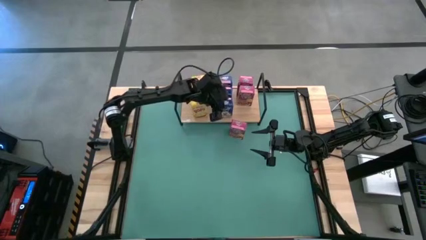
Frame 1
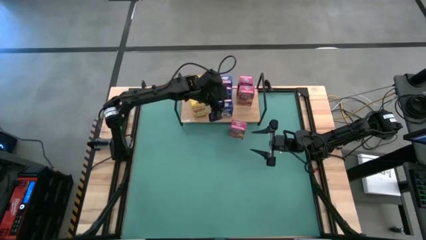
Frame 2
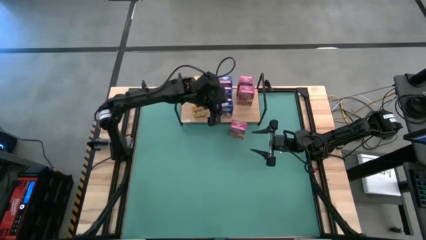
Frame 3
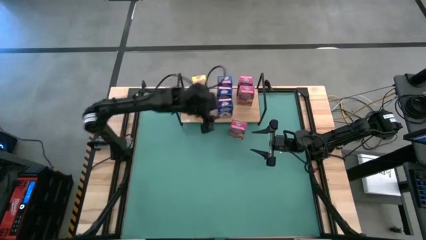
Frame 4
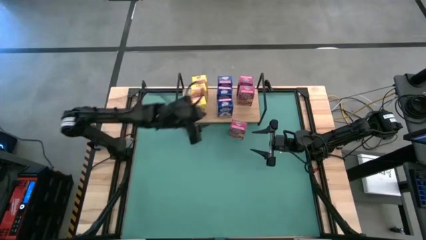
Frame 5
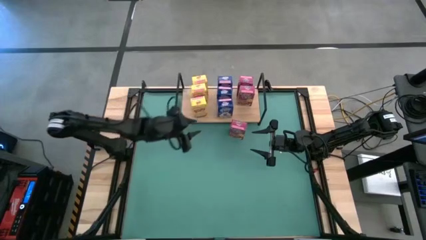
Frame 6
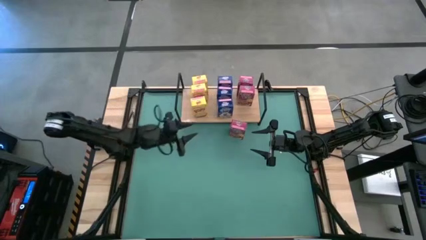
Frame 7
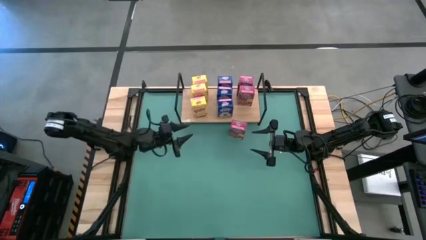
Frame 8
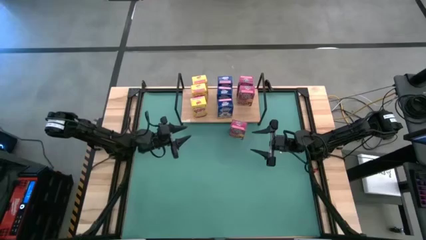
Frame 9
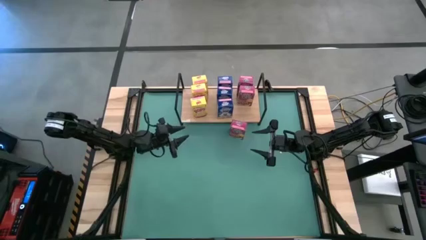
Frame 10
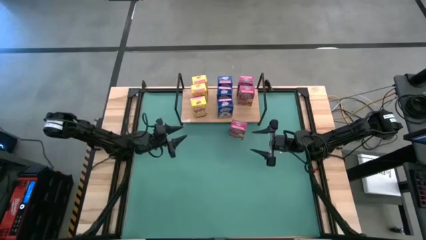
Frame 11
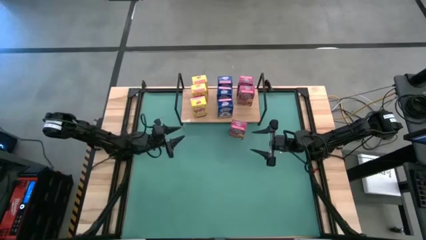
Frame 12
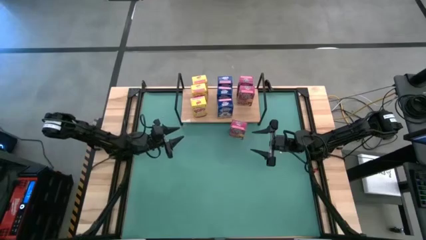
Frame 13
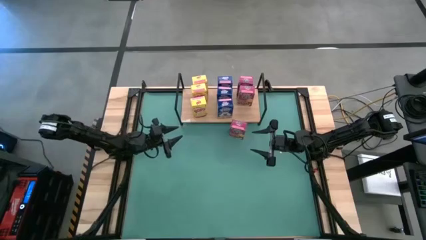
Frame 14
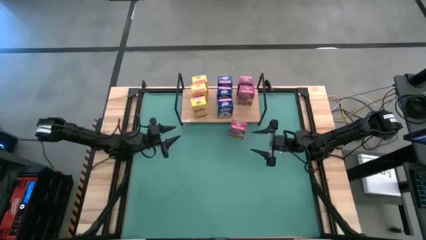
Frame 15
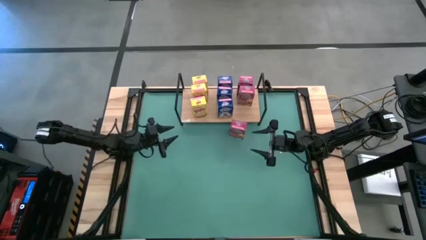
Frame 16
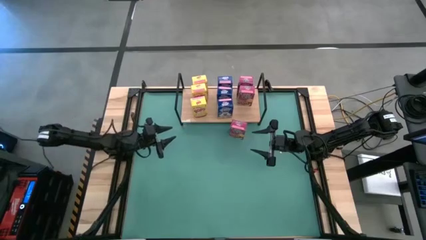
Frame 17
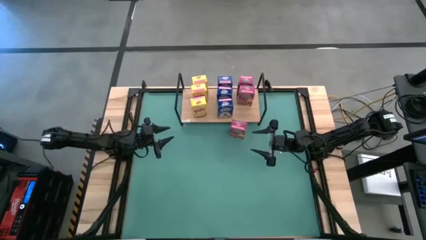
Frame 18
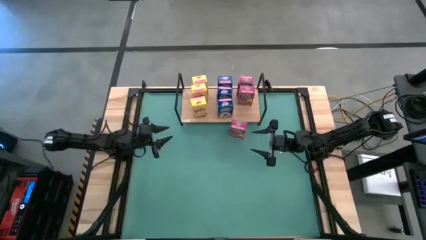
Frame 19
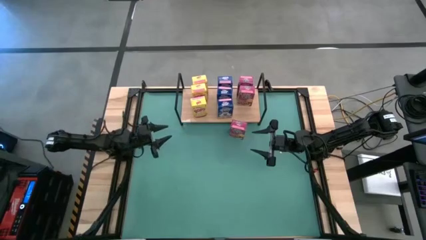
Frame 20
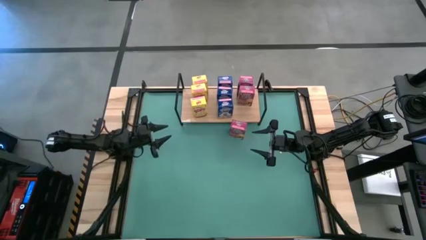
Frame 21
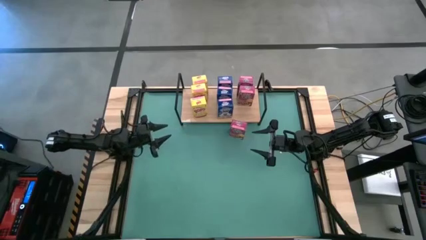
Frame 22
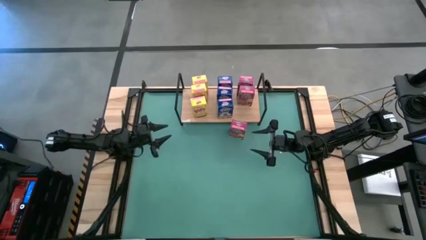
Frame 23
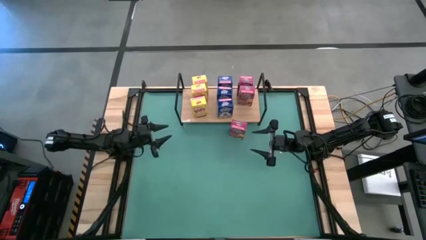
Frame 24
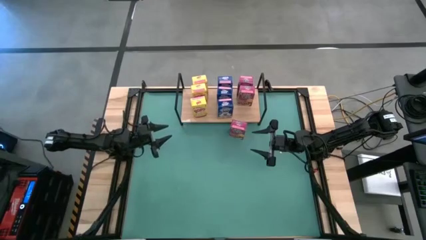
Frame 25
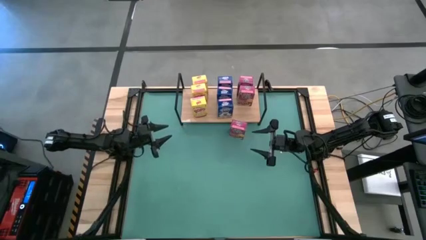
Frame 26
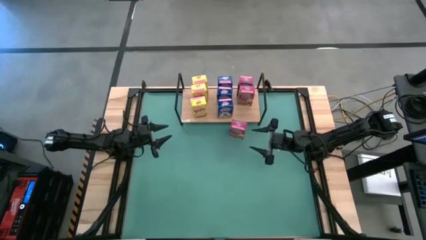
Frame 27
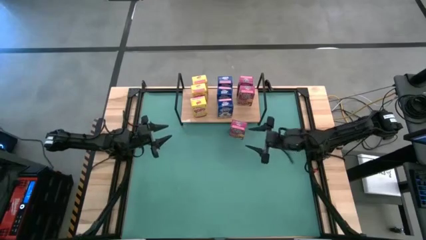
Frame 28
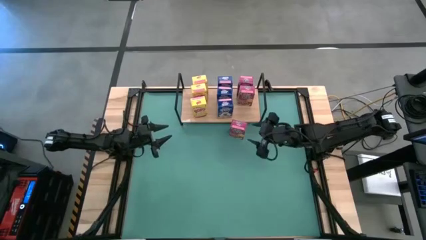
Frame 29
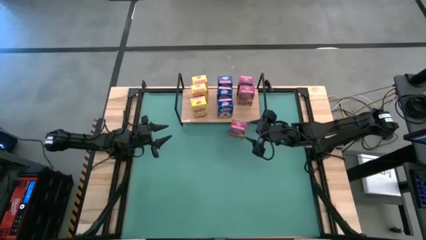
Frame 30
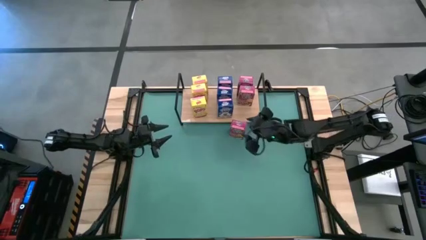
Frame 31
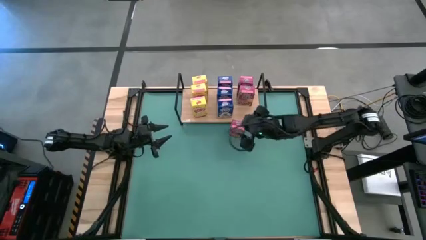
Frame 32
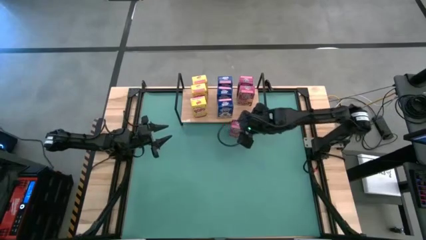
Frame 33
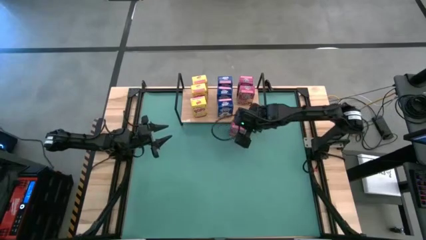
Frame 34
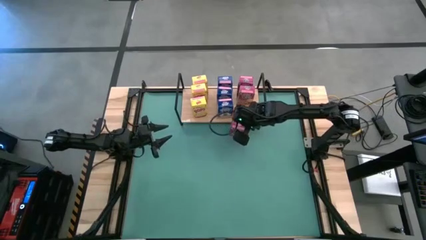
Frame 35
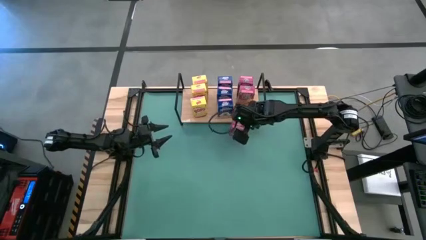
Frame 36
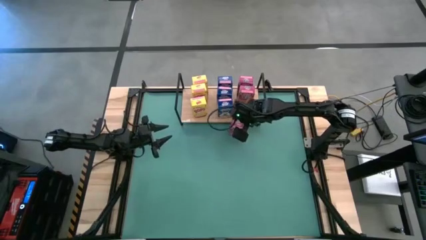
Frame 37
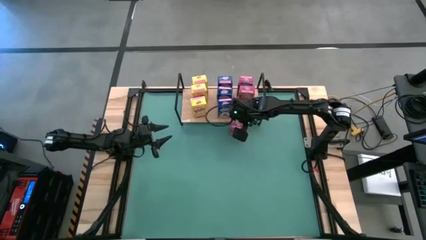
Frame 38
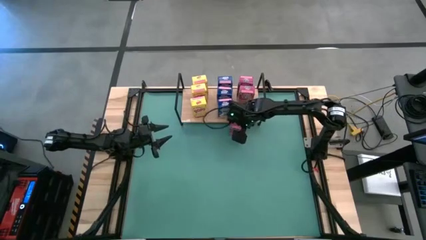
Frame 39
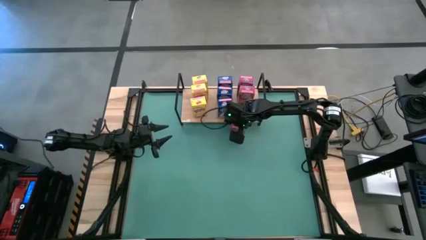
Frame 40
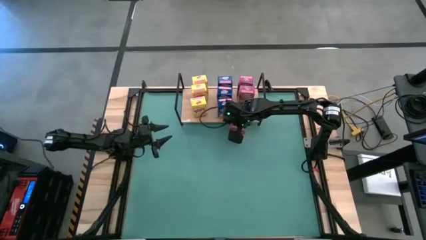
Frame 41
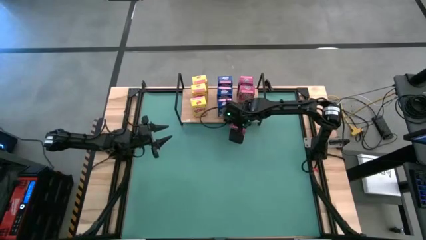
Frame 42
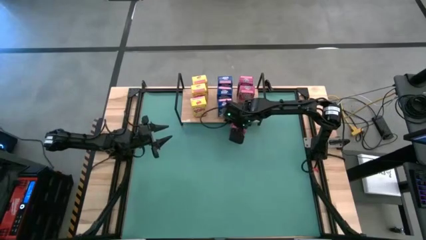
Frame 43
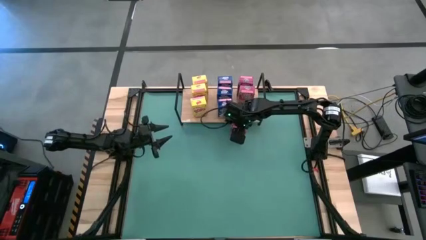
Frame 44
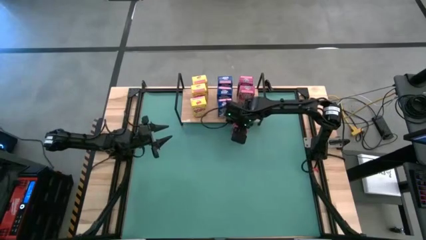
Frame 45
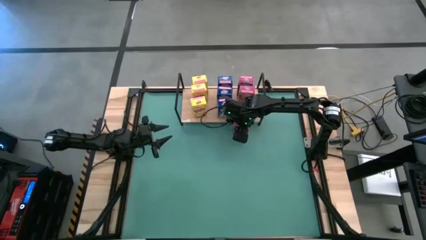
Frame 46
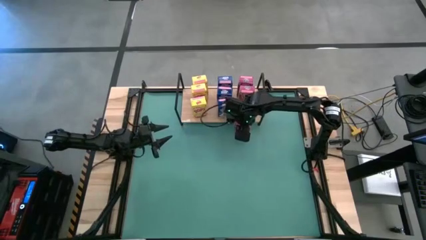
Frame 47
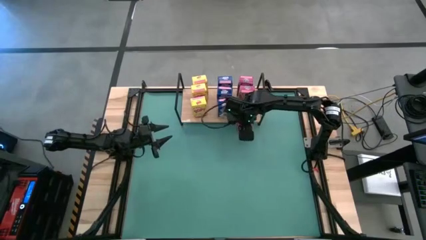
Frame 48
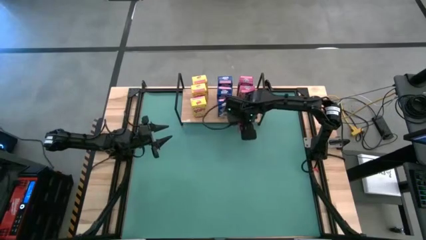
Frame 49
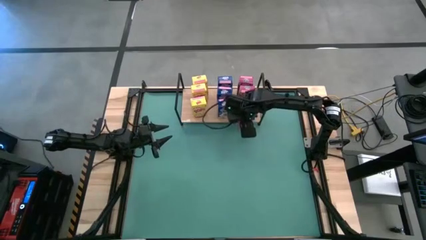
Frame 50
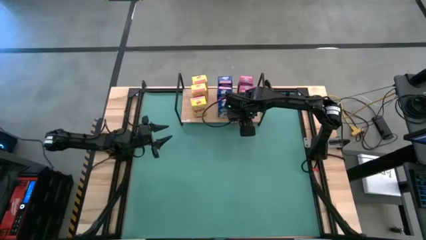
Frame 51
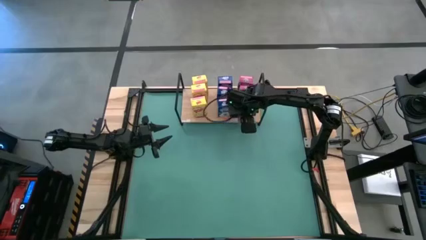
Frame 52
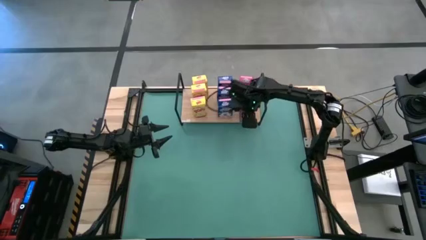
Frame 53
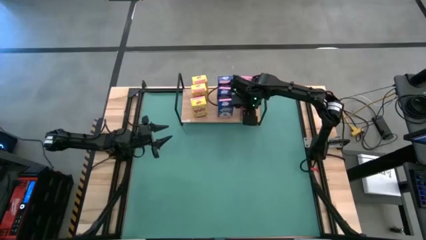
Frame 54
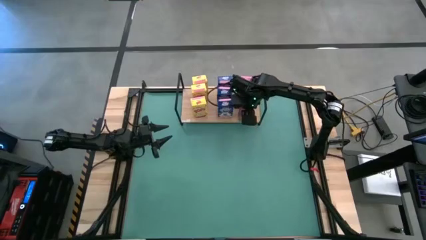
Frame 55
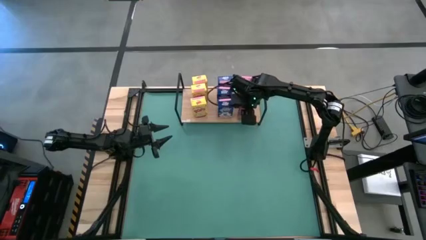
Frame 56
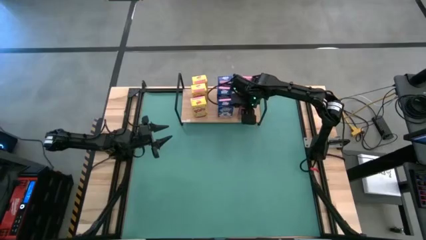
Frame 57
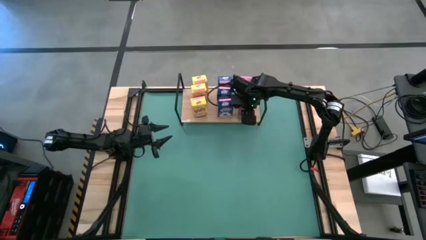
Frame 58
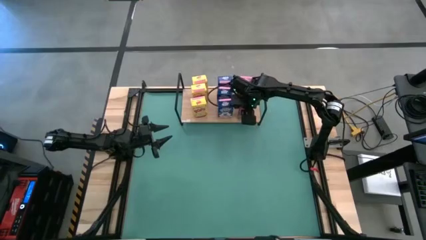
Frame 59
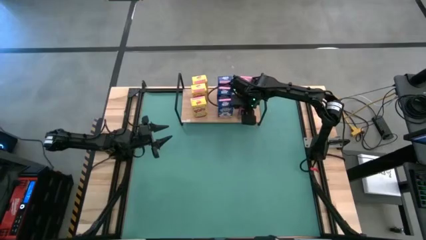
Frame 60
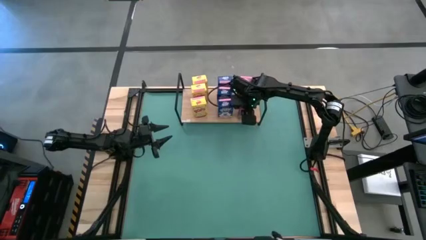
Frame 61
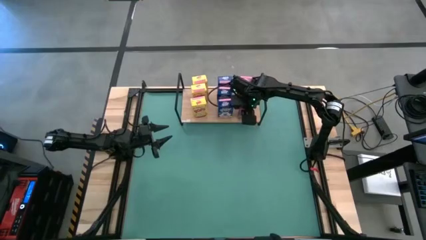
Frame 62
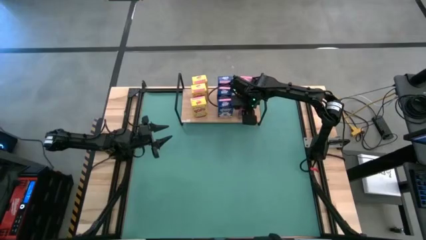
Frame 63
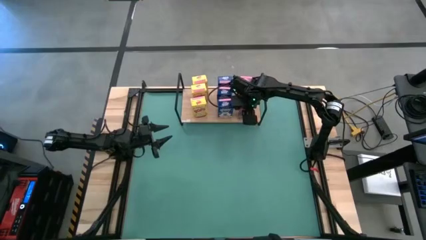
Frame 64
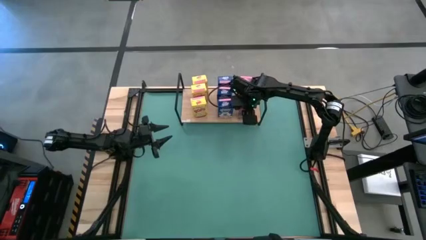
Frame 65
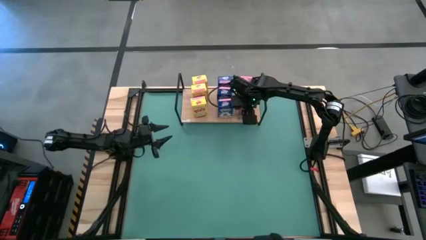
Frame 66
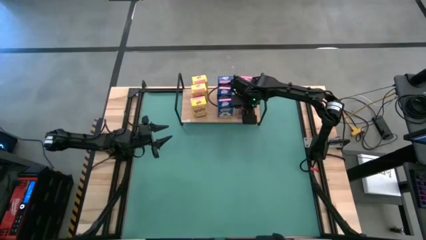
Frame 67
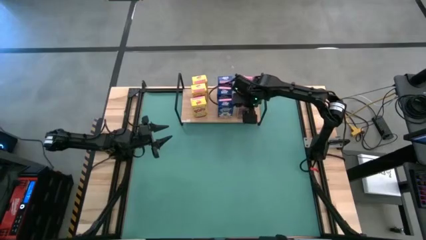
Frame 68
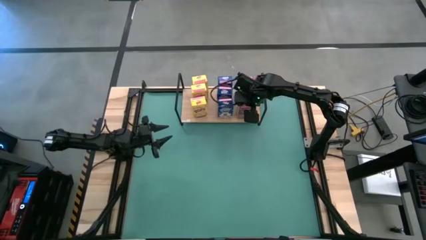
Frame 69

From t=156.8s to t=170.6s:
Task: Stack cereal on shelf
Put the pink cereal box on the shelf aligned with the other pink cereal boxes

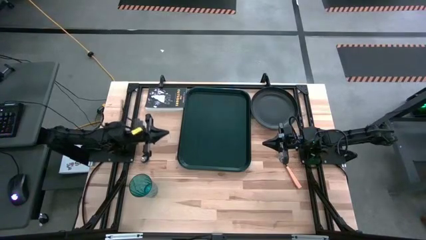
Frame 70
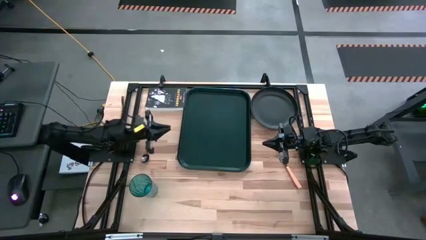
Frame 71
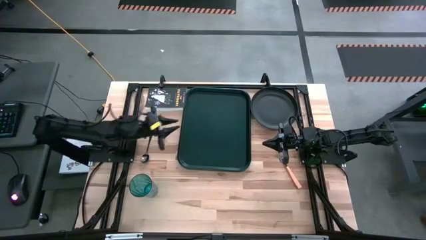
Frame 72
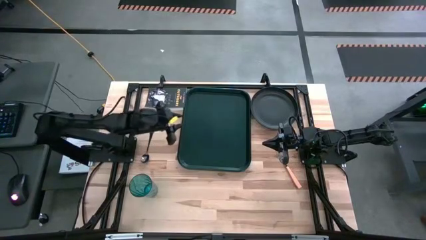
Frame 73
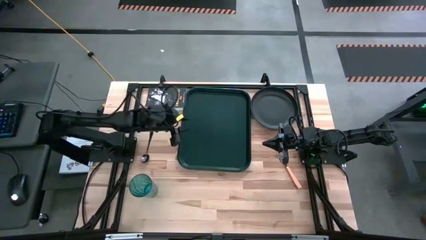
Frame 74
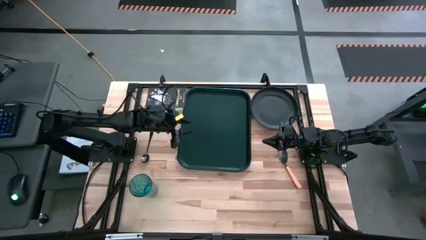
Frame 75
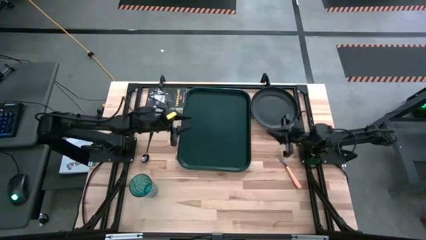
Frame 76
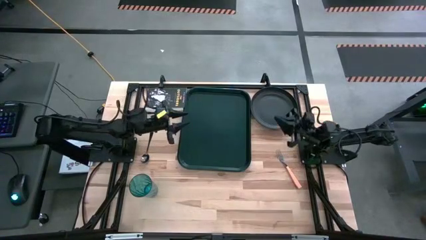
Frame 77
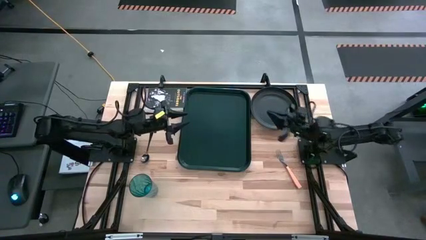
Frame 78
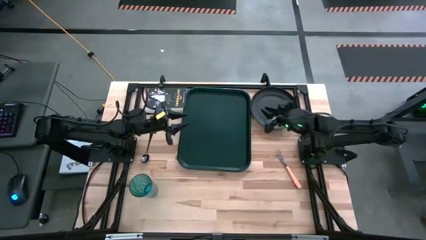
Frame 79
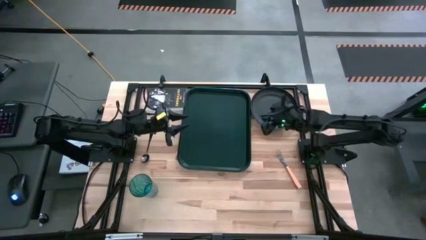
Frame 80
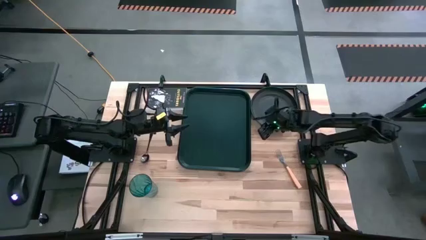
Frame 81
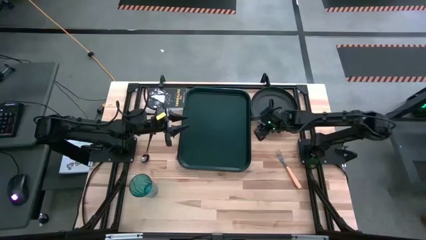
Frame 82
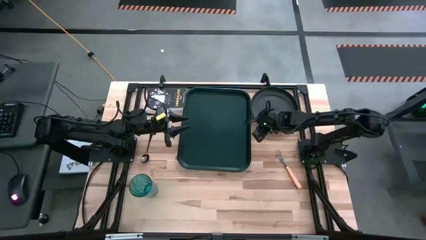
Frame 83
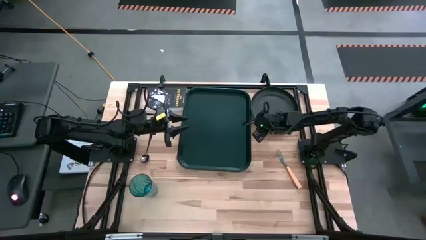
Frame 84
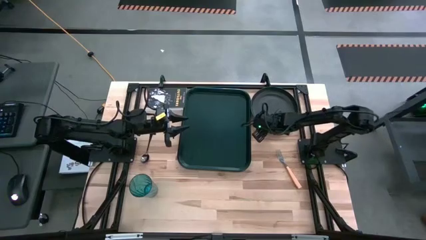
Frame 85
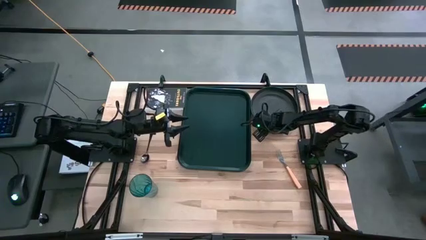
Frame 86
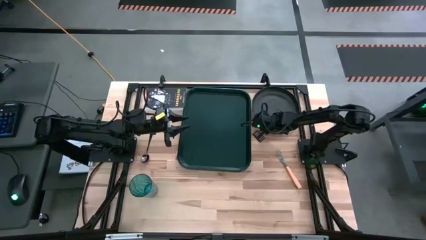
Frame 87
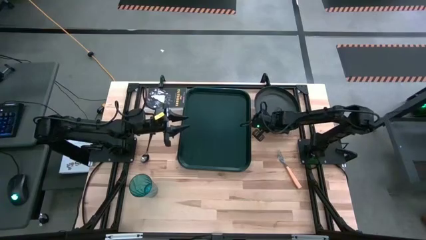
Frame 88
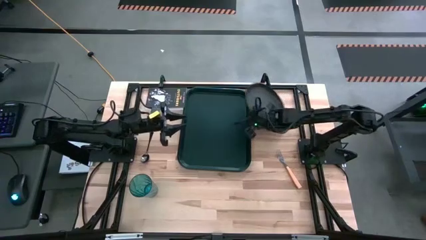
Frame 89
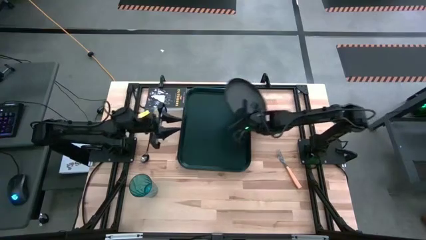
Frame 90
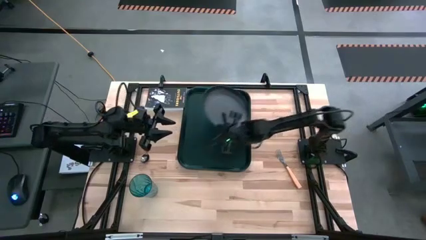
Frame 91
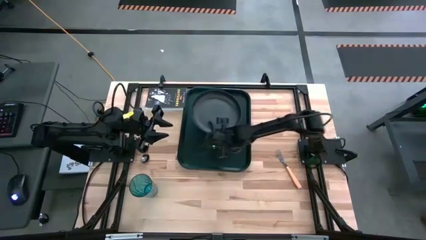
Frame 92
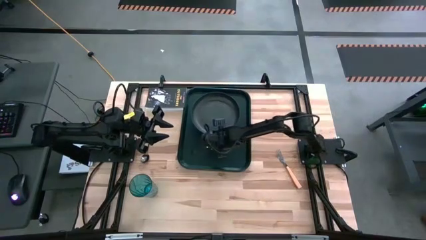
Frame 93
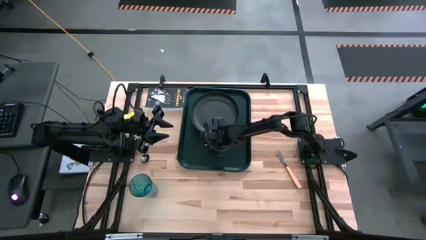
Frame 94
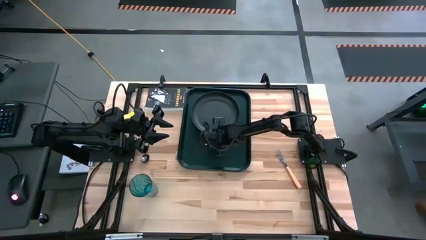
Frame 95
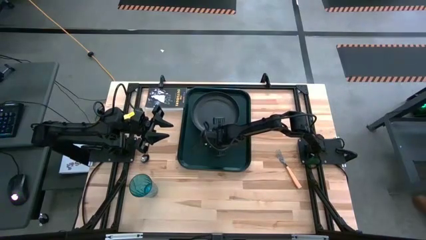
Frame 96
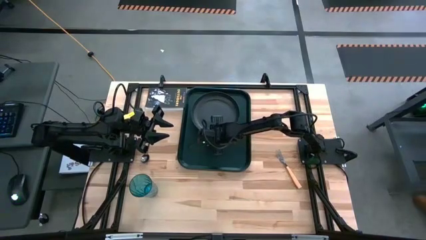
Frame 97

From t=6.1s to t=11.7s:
Task: Pick and place plate/cup/fork/spoon on tray
Put the black plate on the right of the black serving tray
